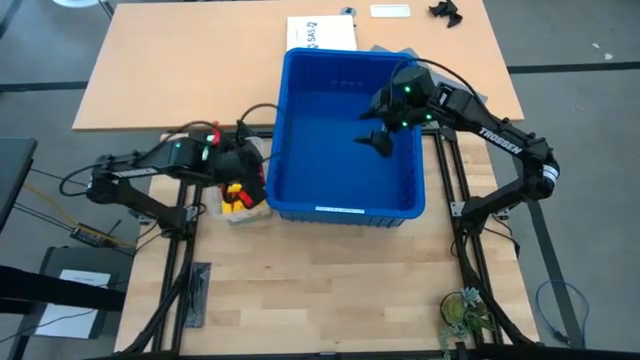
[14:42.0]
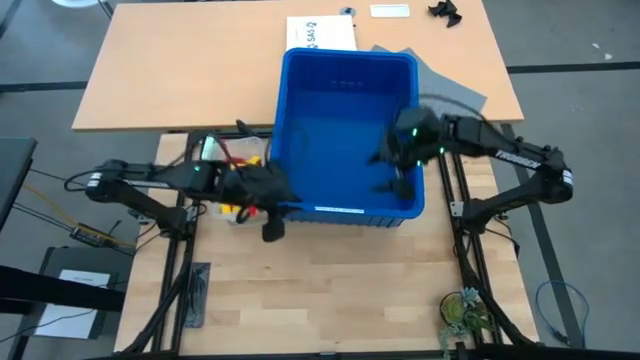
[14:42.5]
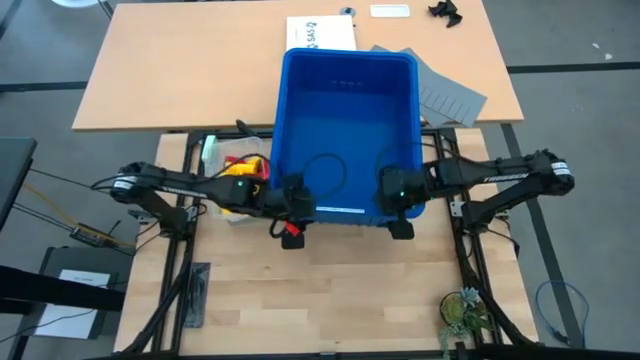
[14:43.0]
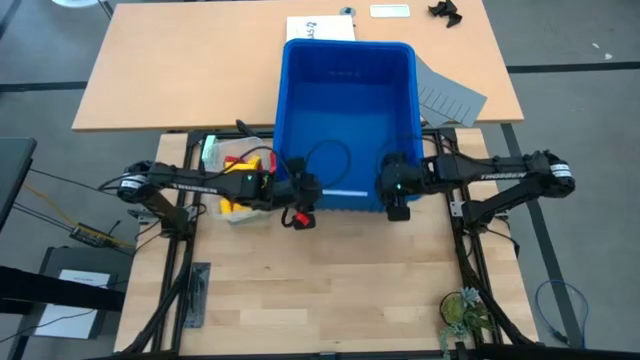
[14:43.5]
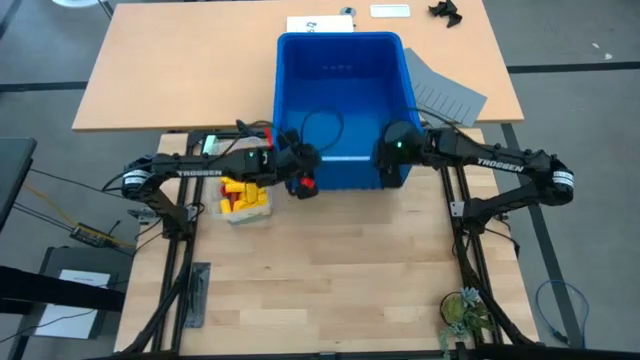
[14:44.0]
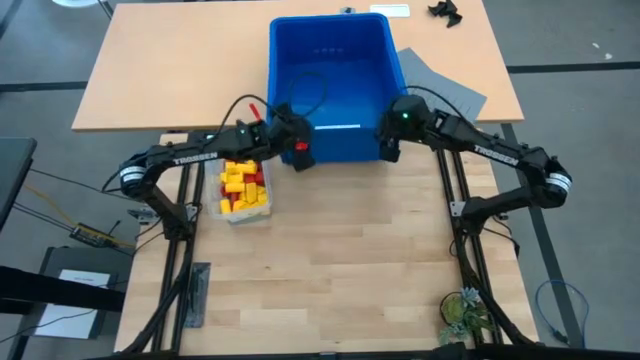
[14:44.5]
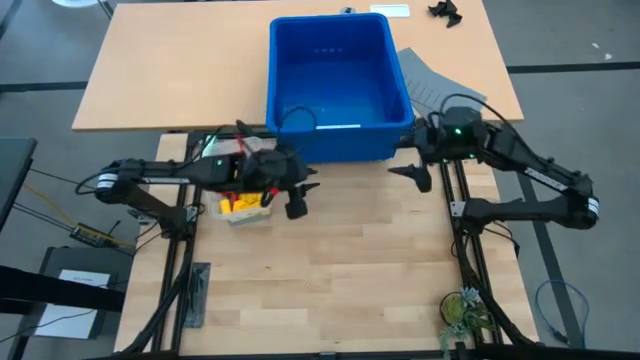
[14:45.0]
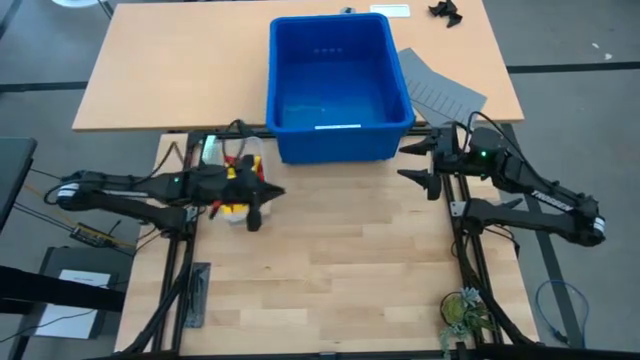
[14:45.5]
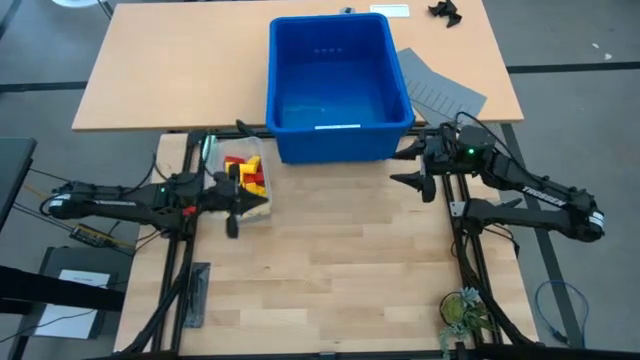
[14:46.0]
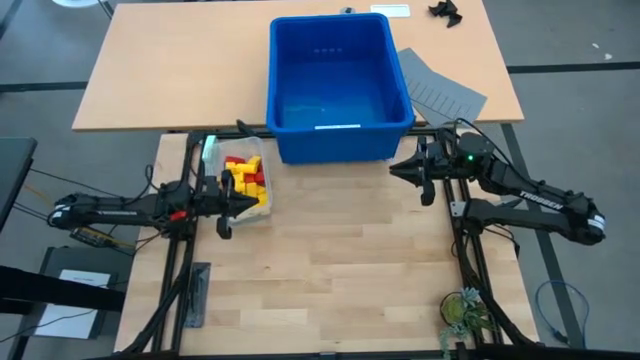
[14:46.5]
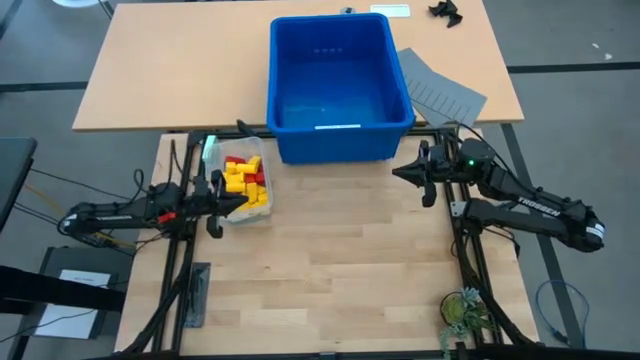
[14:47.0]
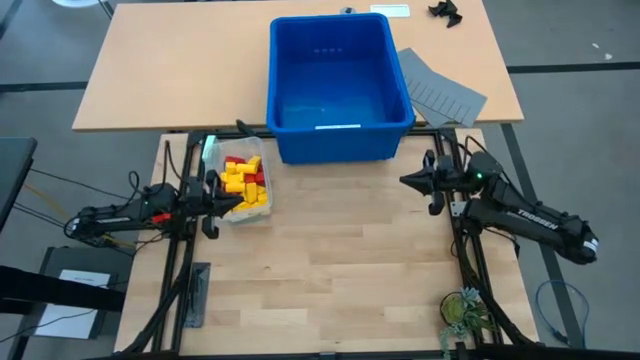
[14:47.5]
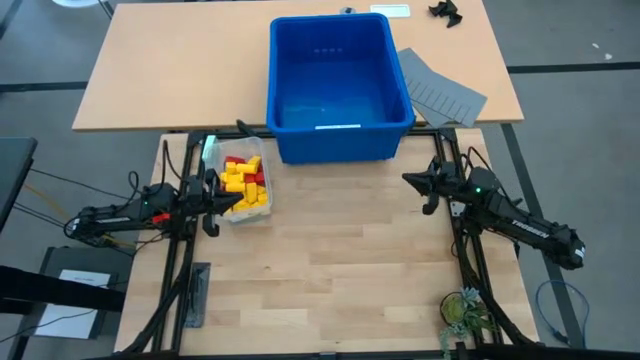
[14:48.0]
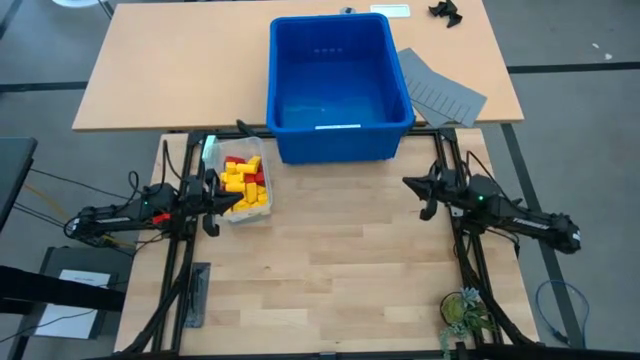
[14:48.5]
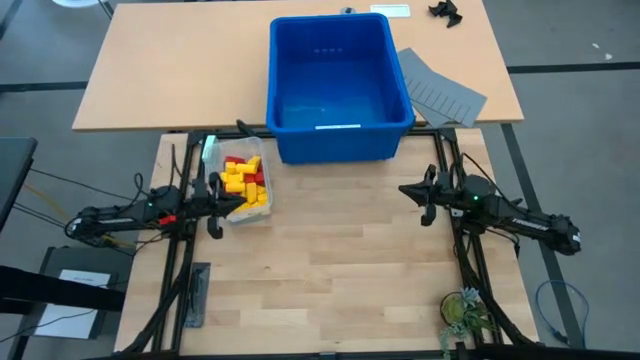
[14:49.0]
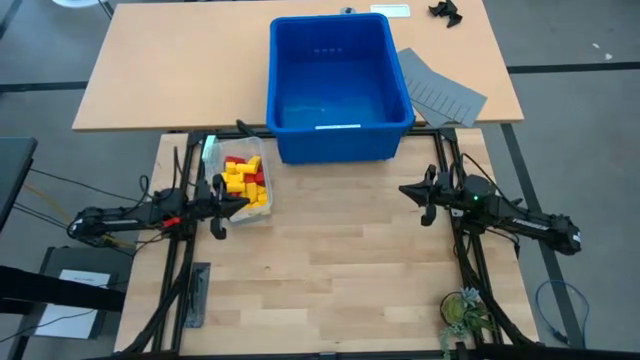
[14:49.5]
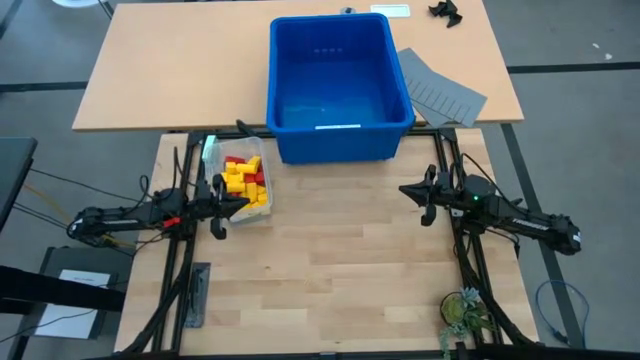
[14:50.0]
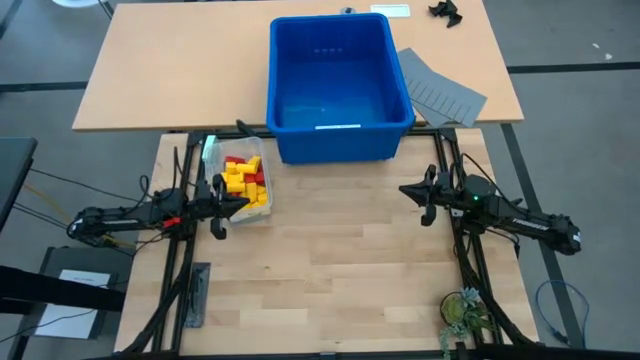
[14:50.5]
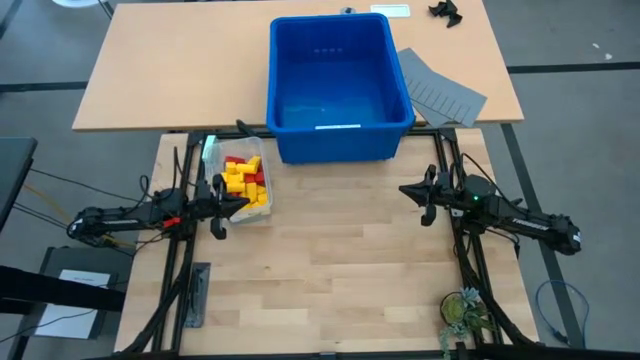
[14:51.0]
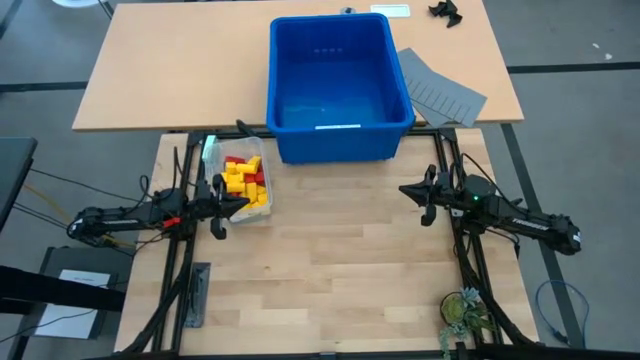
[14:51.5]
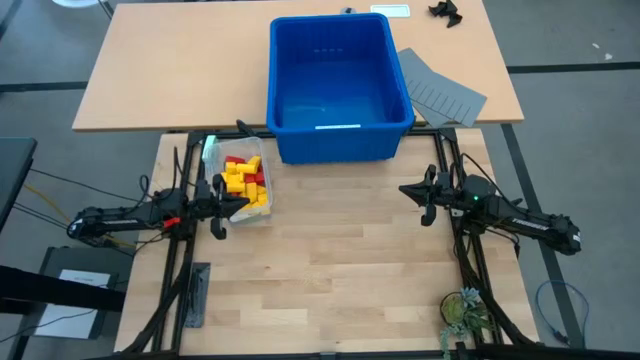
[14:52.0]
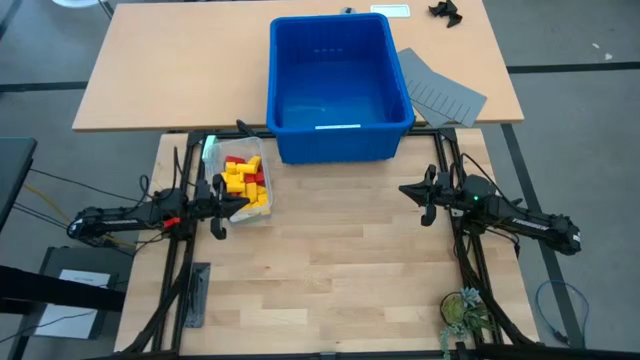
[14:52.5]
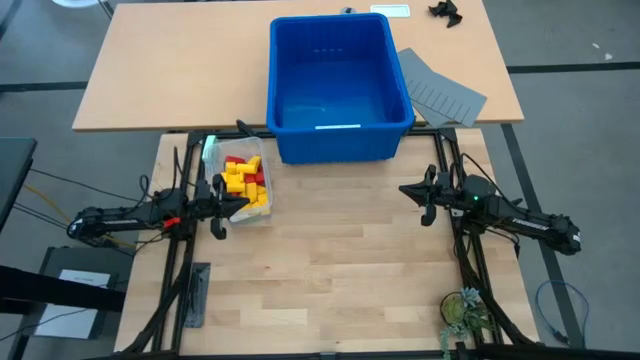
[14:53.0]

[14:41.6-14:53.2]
Task: Sort blocks
Return to Home Position

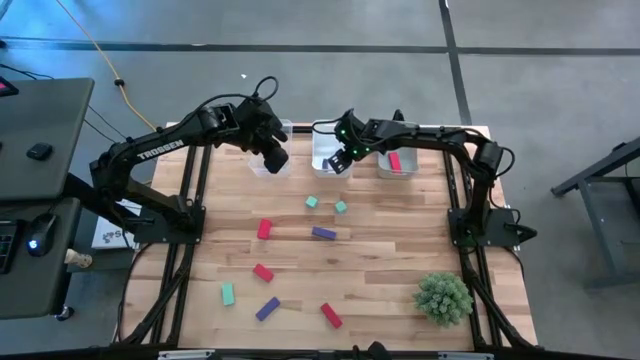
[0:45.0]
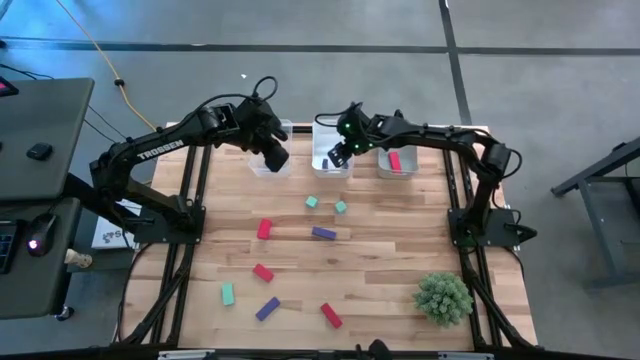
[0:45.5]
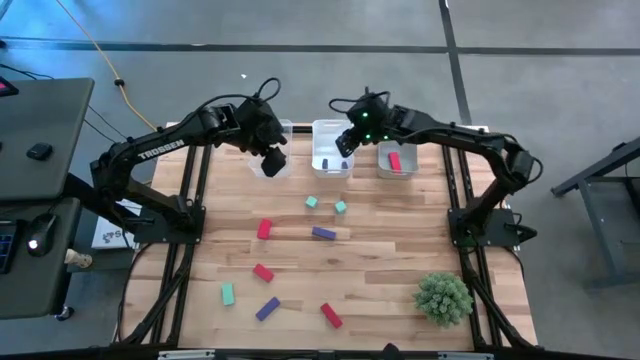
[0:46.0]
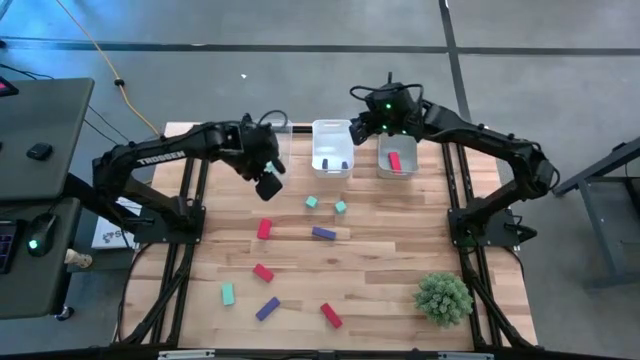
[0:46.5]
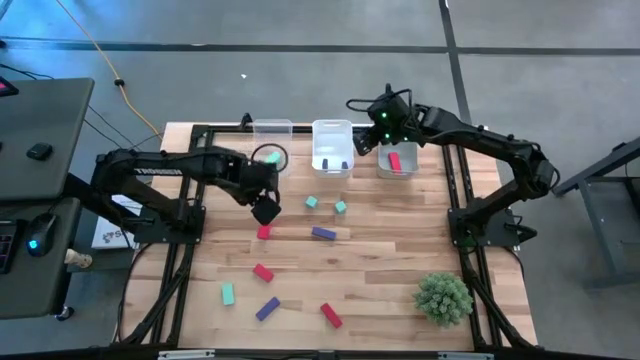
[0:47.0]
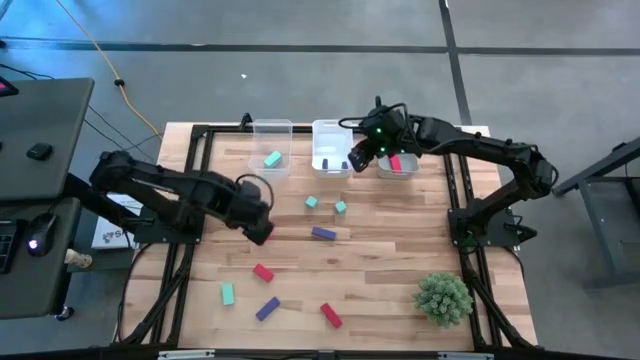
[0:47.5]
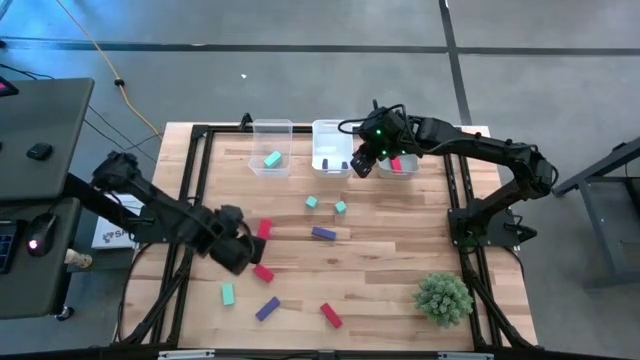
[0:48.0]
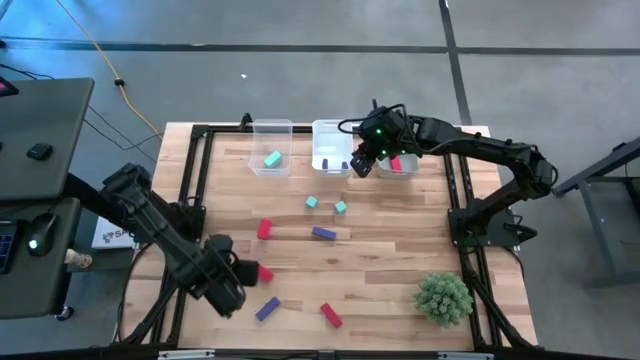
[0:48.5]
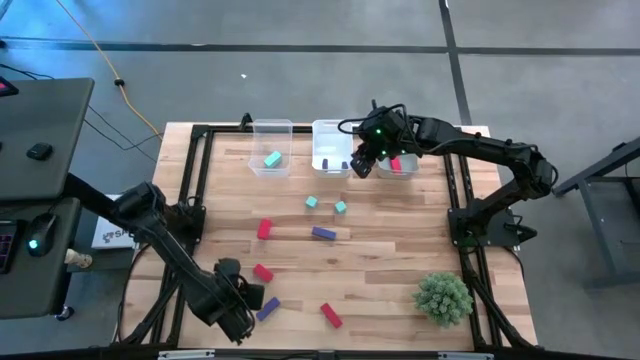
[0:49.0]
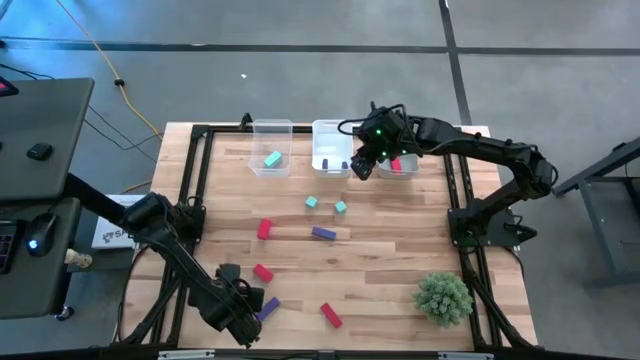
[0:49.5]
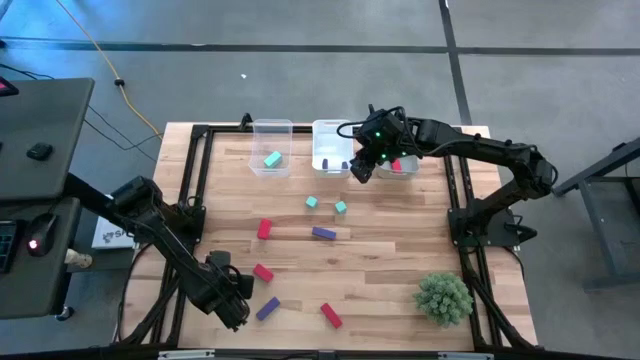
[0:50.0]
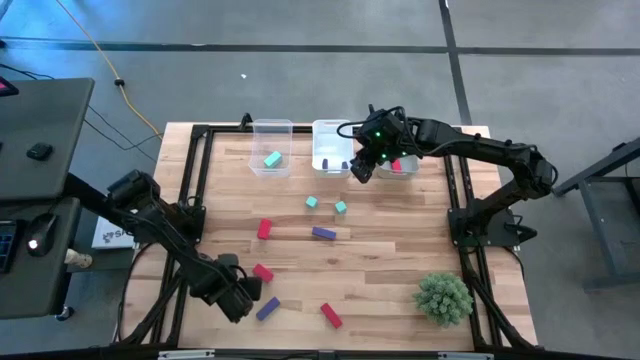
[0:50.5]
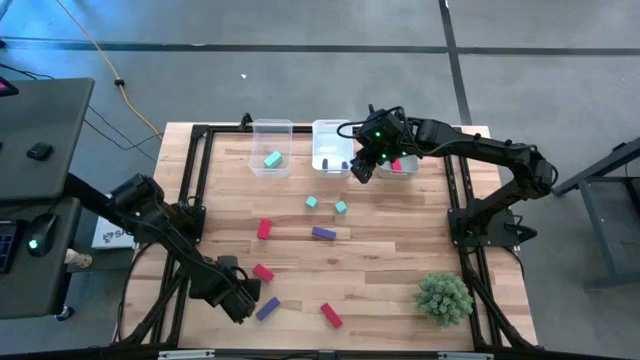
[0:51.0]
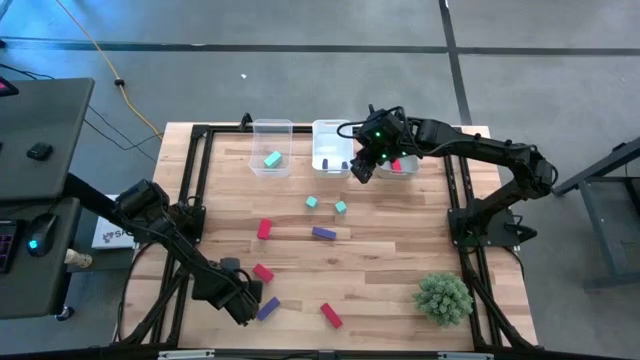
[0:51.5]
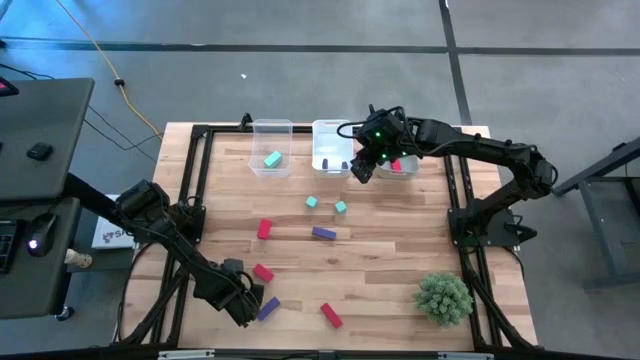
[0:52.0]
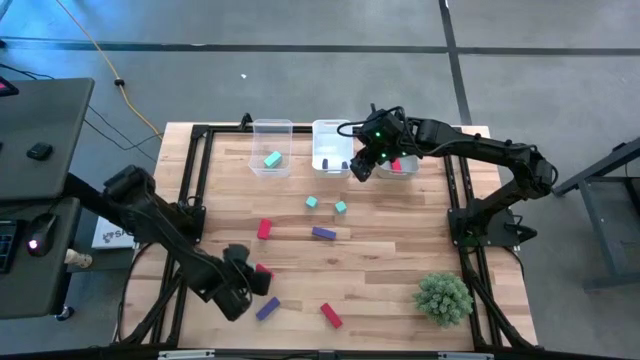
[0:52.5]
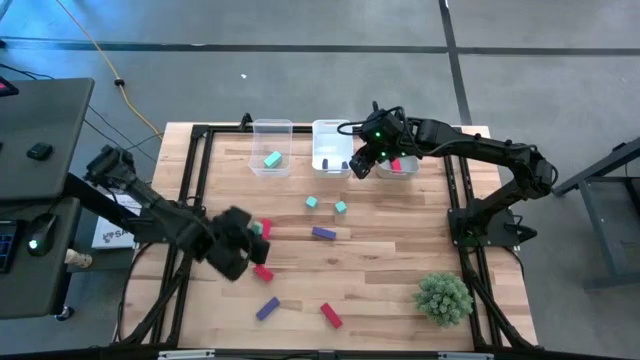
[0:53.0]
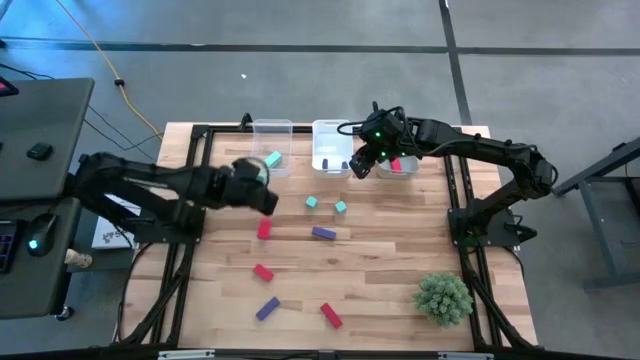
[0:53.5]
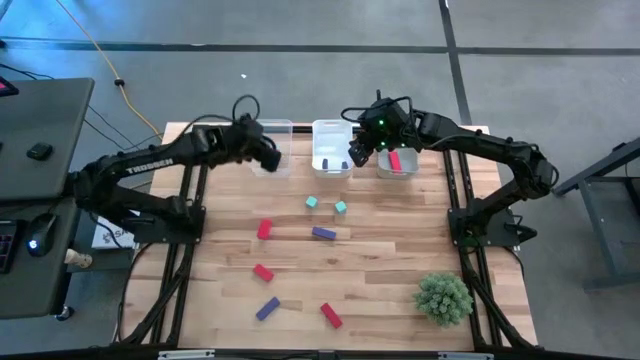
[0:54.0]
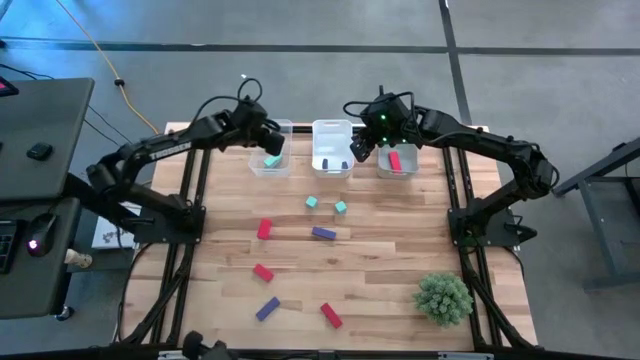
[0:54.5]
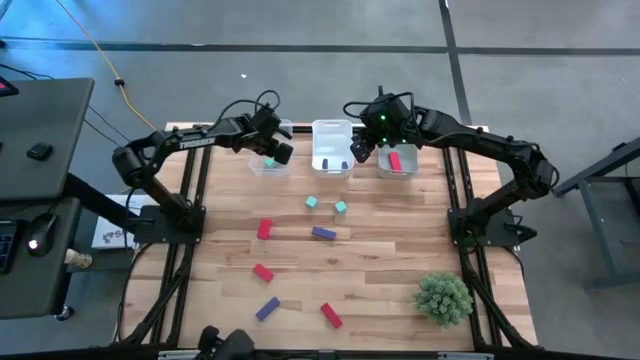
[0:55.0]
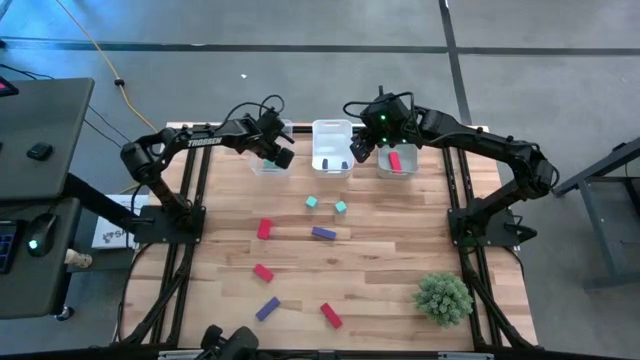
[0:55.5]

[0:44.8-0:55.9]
Task: Sort & place blocks by color
Put the light blue block into the transparent bin
